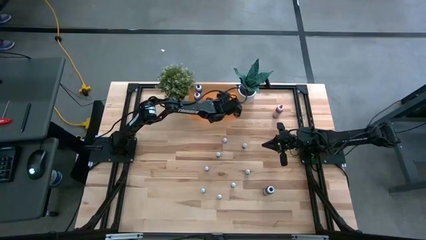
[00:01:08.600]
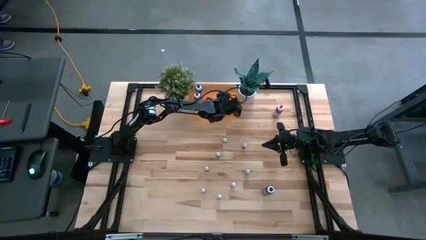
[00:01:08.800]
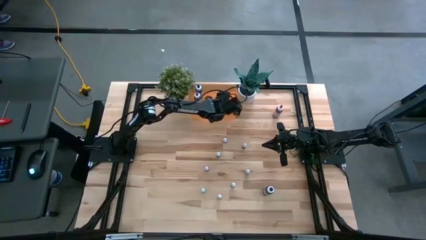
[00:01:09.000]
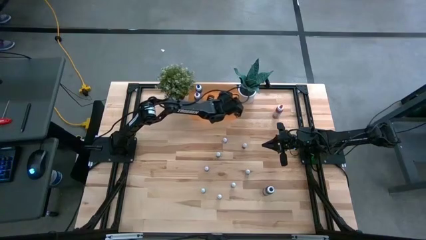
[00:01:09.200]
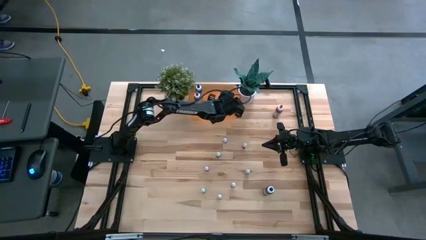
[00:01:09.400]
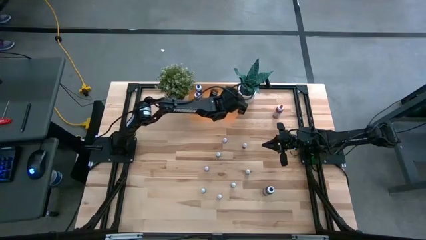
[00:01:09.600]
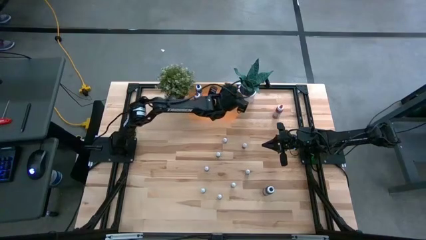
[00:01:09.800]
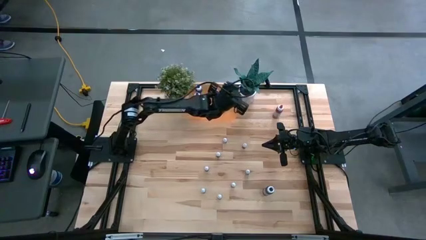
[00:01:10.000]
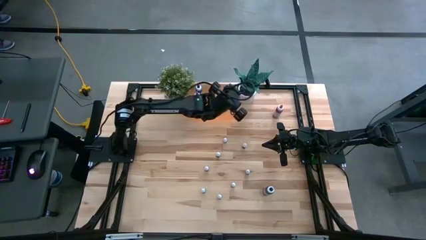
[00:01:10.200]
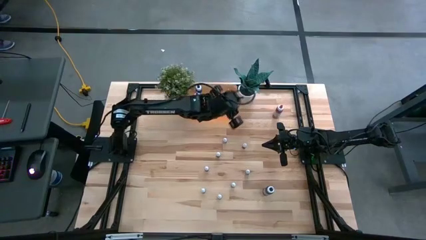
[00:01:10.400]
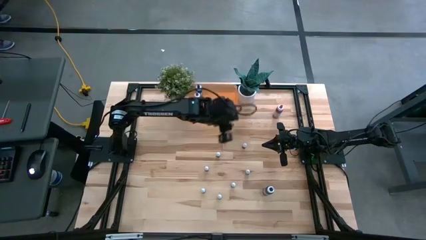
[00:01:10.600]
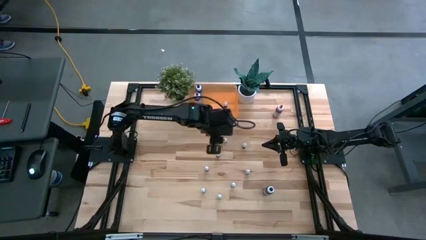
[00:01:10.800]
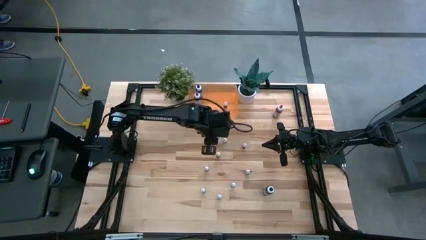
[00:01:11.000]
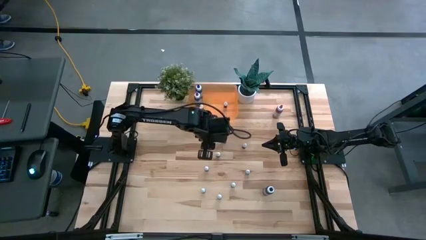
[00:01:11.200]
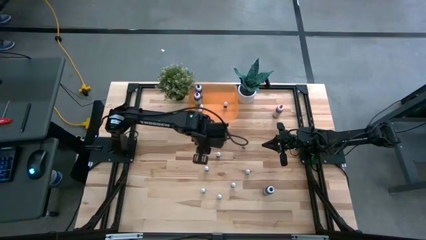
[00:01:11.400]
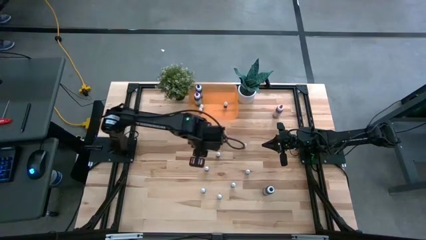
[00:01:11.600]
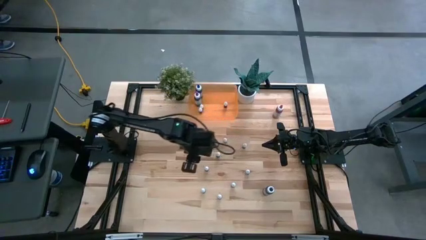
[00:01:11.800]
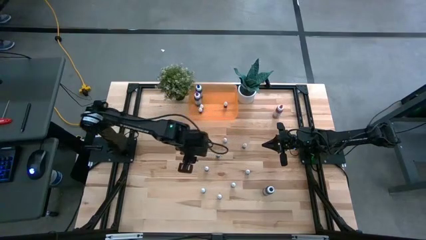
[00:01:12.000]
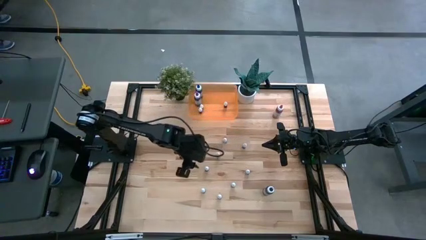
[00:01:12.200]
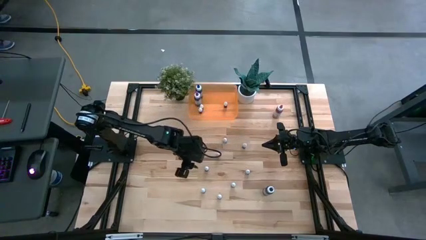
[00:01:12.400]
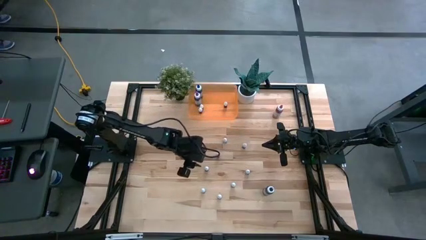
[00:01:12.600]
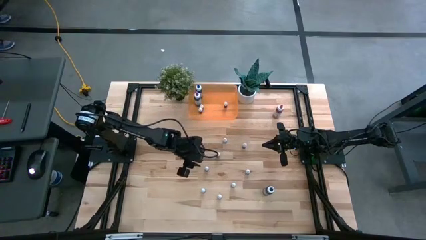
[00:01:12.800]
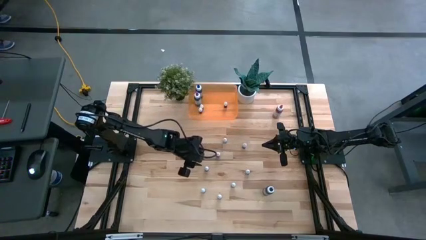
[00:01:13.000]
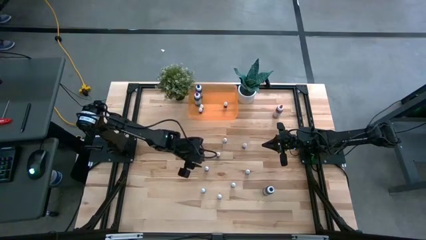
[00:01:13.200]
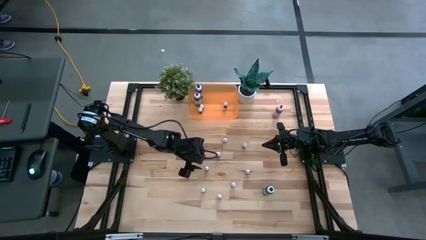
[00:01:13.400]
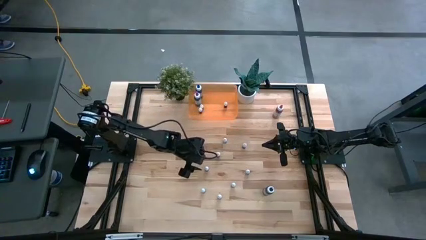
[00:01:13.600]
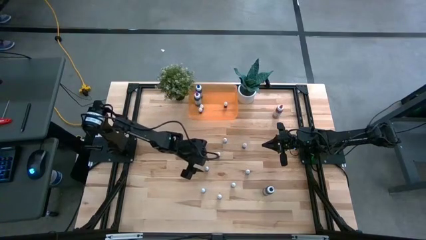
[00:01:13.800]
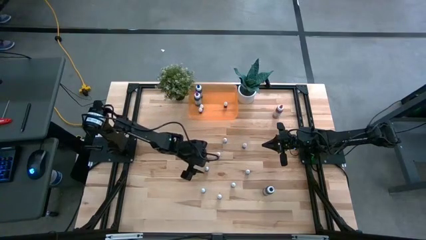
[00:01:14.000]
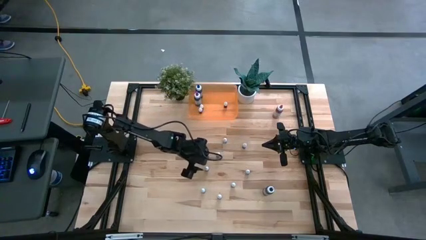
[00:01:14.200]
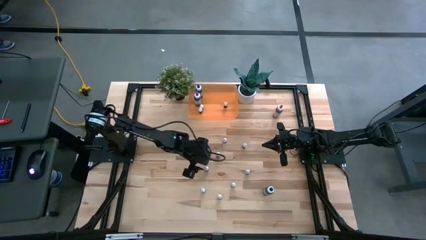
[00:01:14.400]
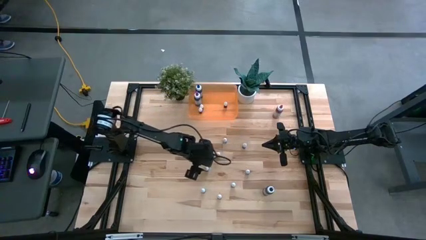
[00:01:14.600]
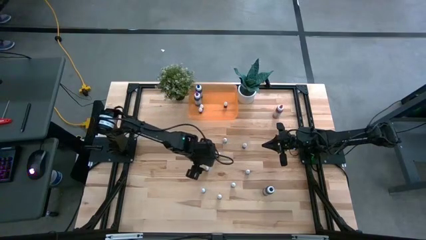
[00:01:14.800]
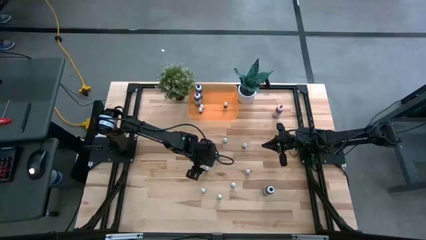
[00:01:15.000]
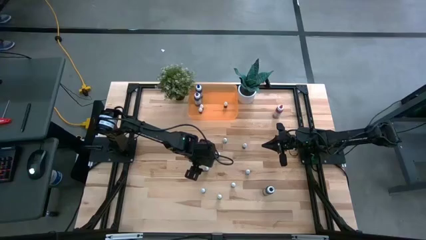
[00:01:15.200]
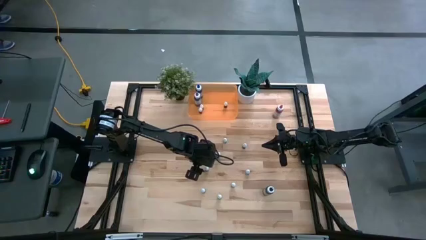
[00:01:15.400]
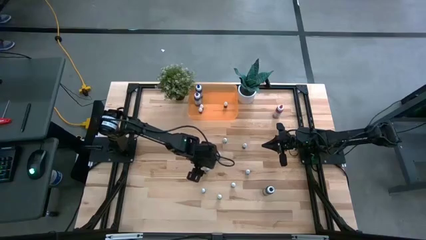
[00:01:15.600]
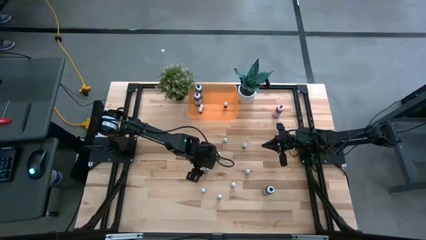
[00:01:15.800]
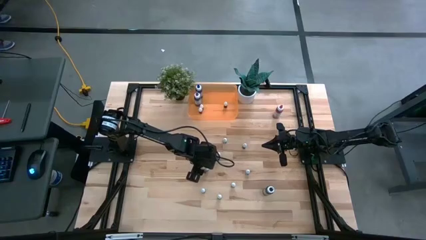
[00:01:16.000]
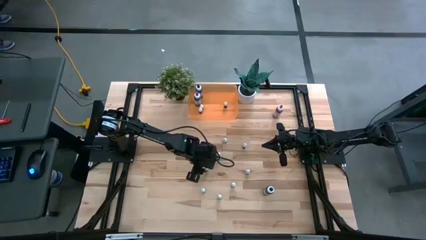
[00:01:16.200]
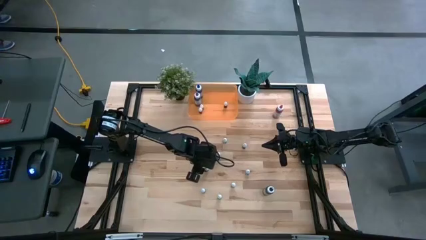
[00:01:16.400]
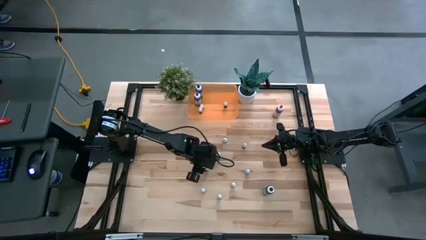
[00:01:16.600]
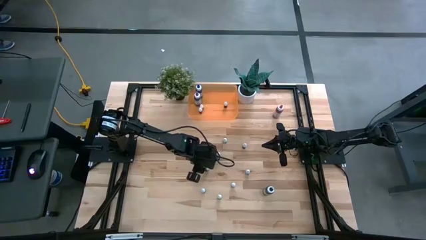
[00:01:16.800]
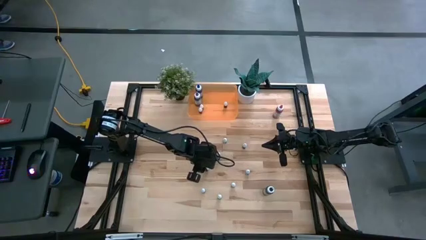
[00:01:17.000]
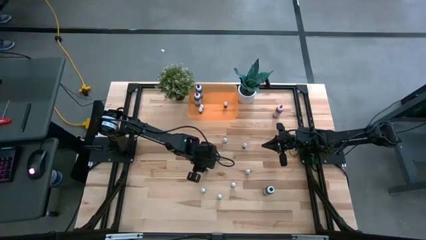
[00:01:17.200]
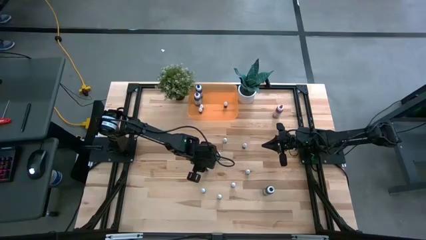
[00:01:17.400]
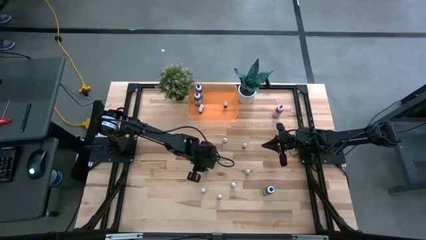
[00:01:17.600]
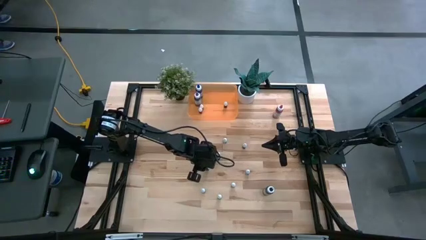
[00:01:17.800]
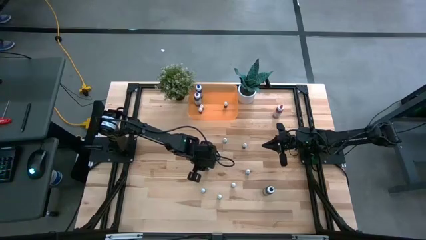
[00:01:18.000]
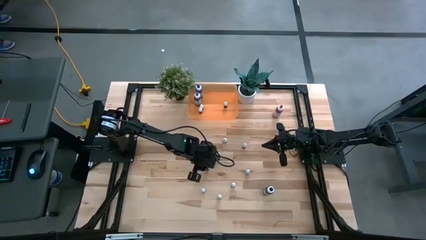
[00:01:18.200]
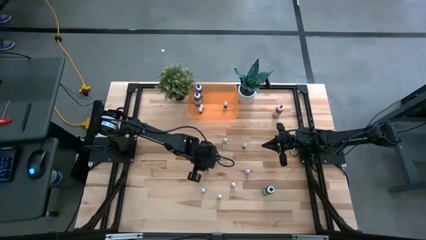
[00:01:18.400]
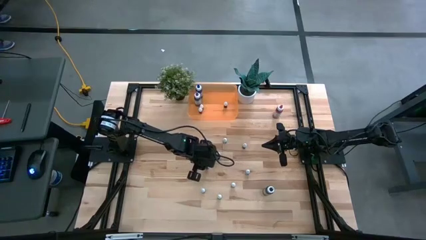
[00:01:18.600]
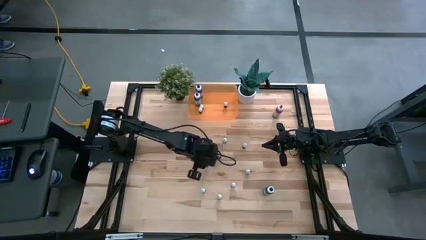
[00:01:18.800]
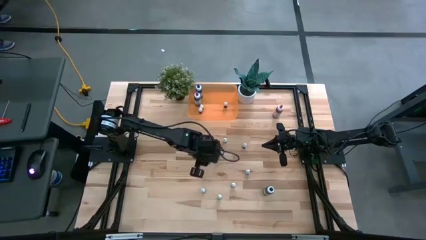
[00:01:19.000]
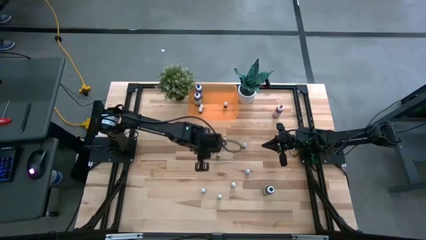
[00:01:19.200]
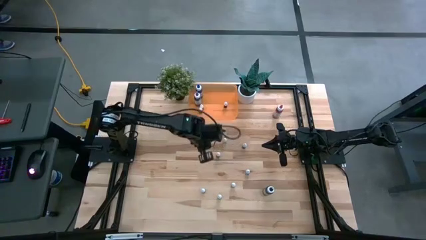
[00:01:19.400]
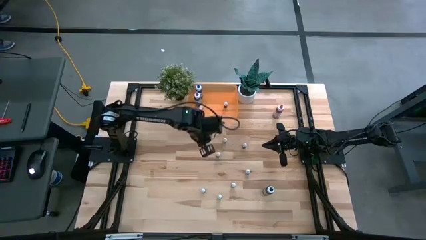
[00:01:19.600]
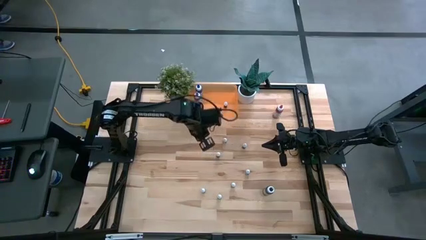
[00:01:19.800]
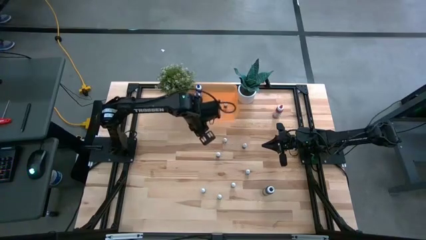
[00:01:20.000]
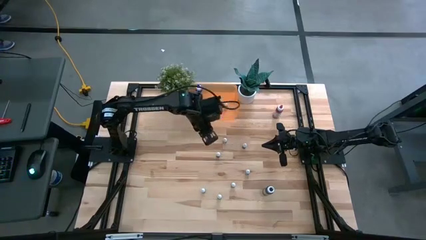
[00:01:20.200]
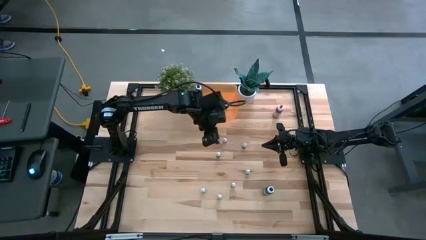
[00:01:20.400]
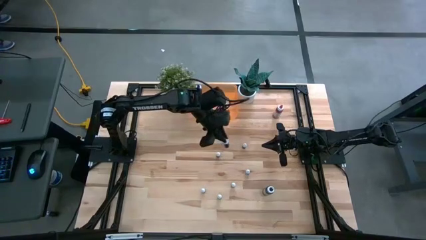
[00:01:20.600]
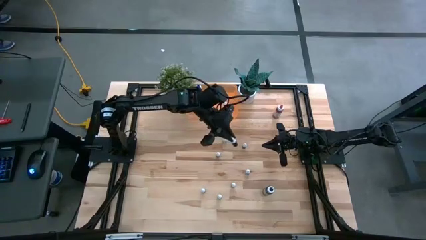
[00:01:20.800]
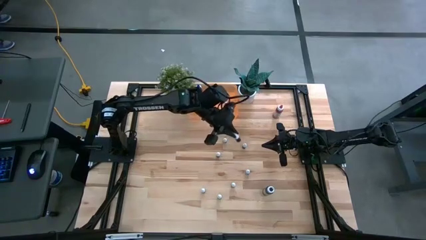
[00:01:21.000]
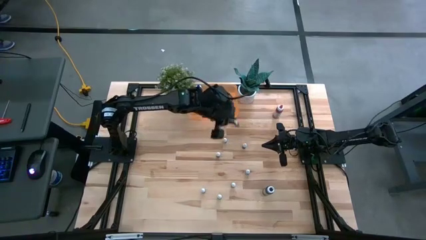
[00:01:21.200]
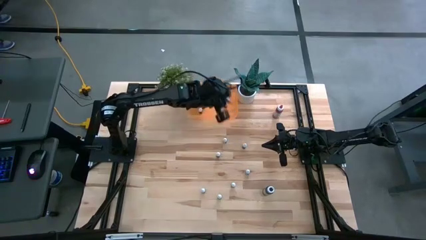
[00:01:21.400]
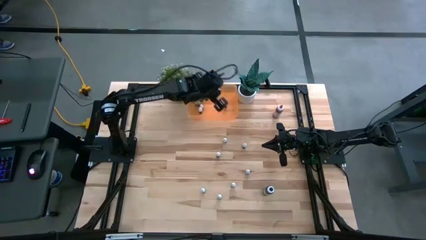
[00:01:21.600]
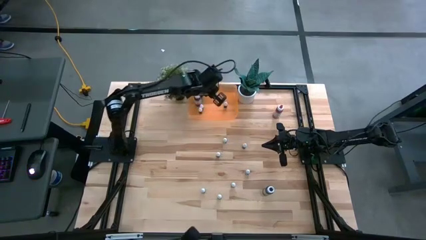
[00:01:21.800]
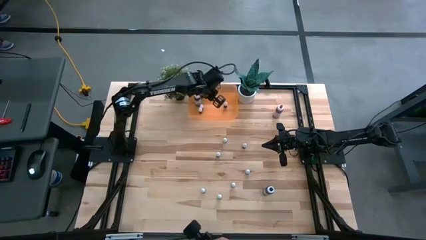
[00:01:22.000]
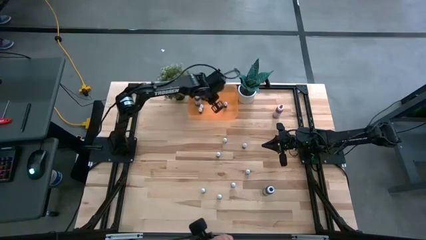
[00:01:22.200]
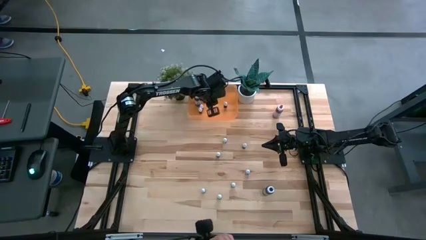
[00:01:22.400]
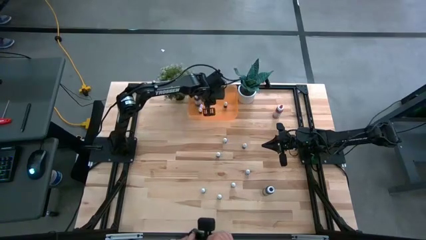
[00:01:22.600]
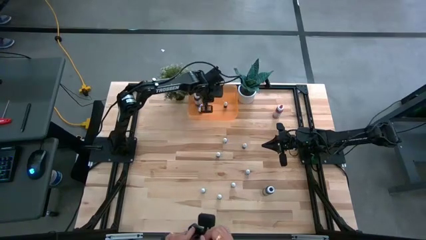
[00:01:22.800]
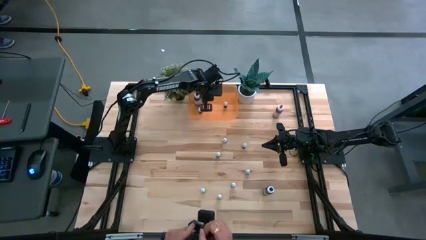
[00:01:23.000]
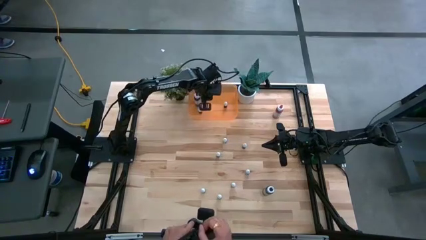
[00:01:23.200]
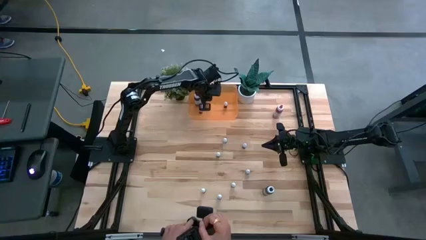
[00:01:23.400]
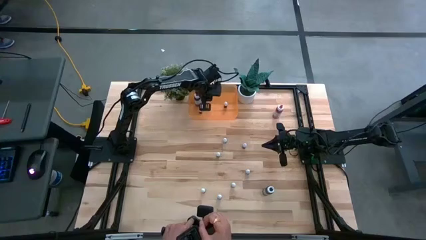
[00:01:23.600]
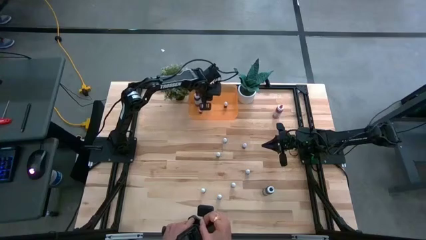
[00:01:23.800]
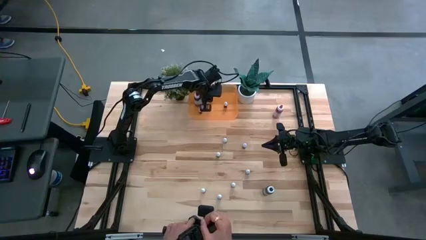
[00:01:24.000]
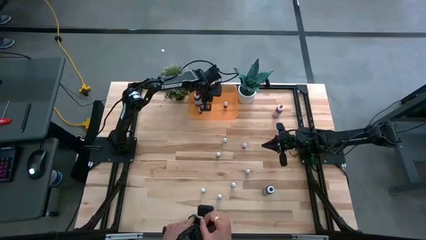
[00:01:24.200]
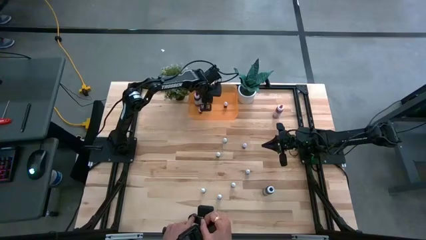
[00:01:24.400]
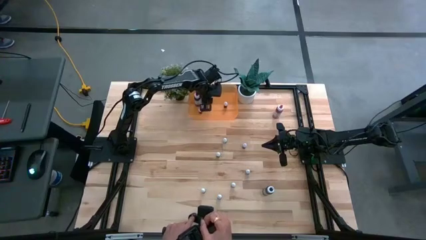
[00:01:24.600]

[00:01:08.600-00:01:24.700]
Task: Pick & Place food coloring
Put the left small violet bottle into the bin
